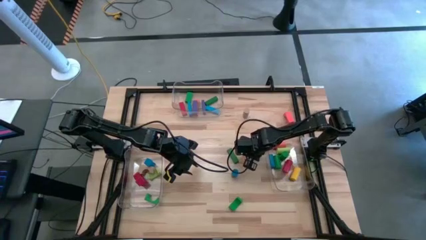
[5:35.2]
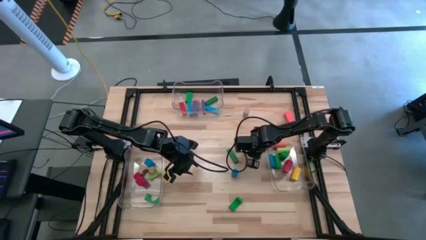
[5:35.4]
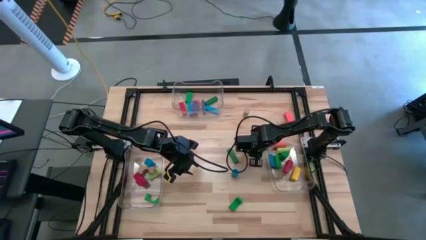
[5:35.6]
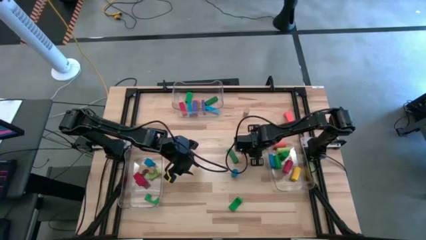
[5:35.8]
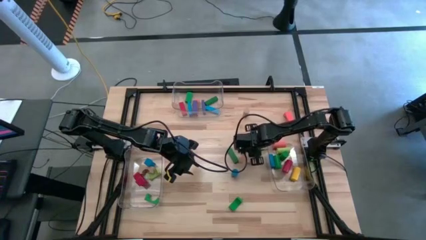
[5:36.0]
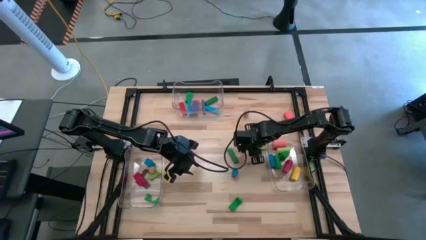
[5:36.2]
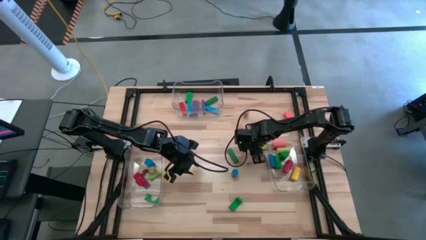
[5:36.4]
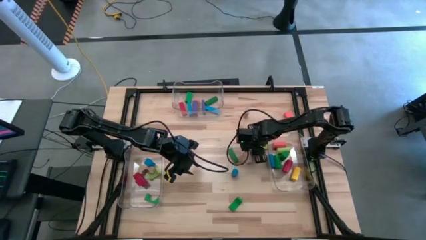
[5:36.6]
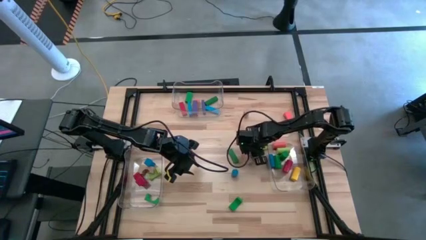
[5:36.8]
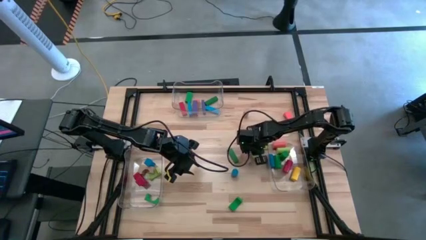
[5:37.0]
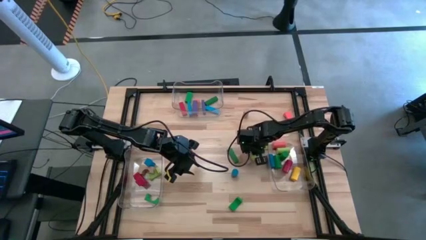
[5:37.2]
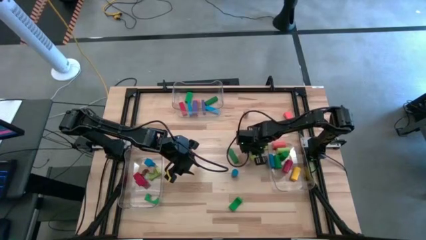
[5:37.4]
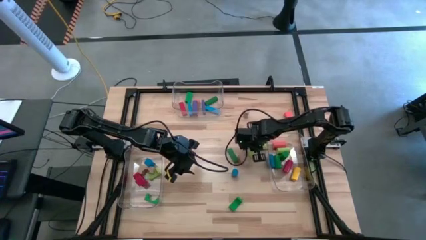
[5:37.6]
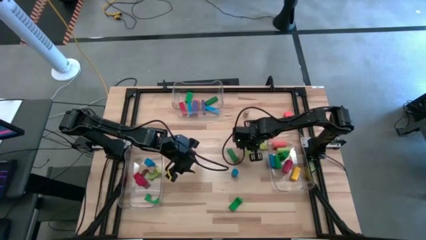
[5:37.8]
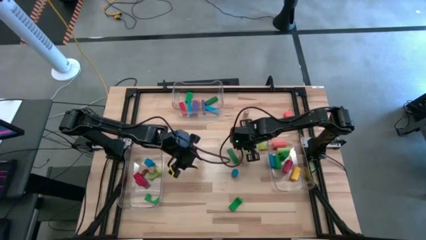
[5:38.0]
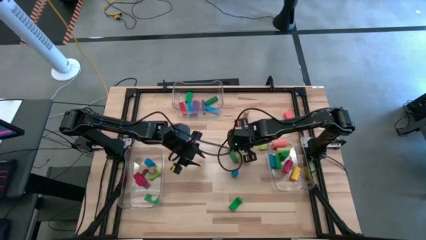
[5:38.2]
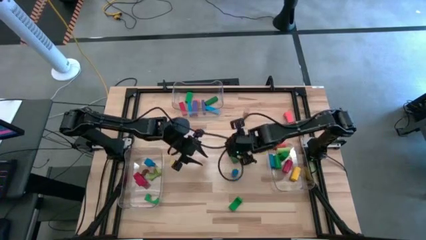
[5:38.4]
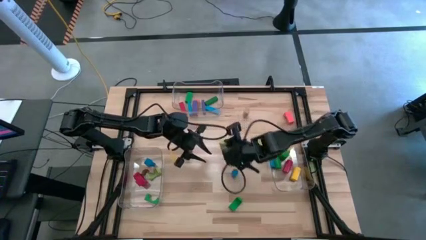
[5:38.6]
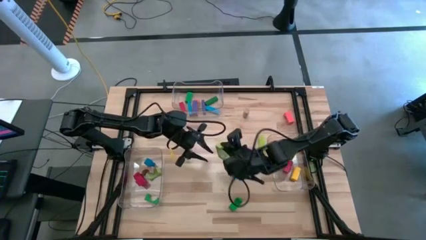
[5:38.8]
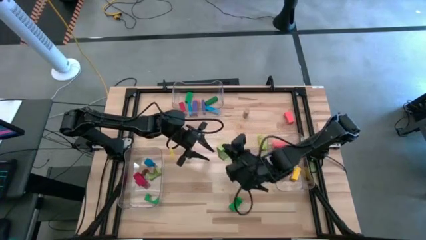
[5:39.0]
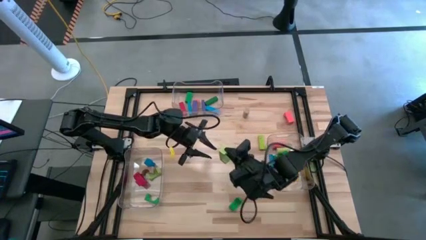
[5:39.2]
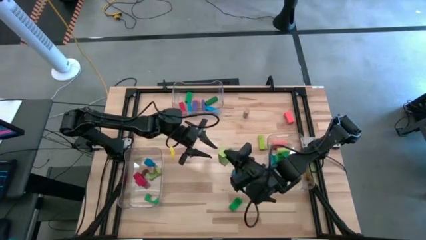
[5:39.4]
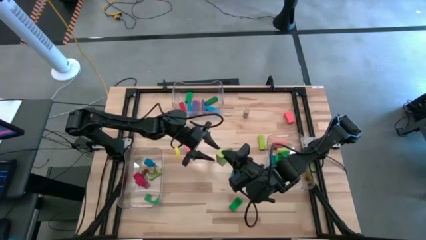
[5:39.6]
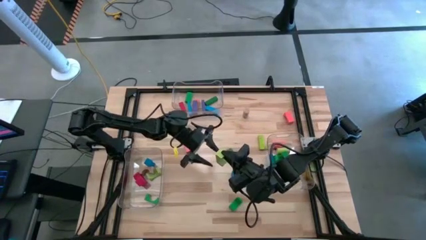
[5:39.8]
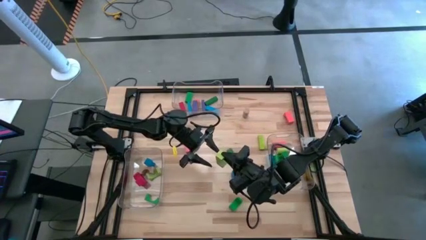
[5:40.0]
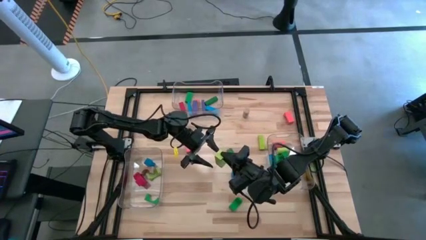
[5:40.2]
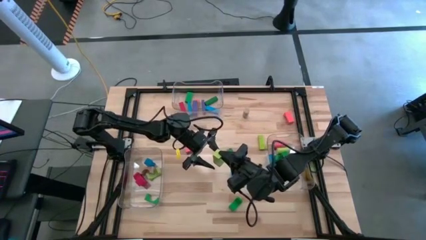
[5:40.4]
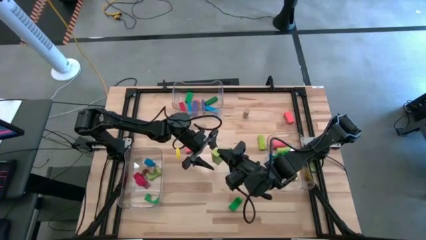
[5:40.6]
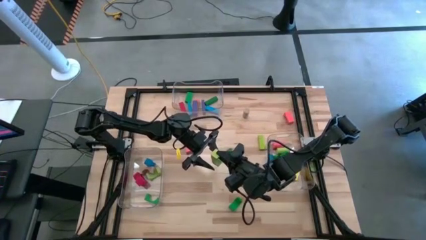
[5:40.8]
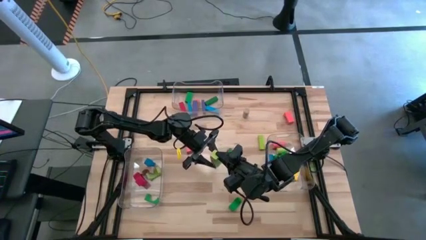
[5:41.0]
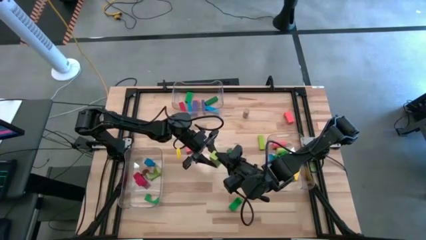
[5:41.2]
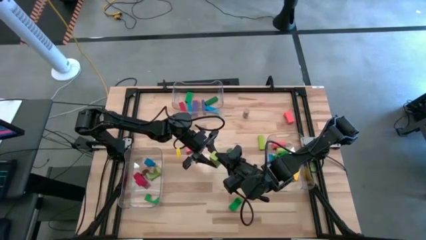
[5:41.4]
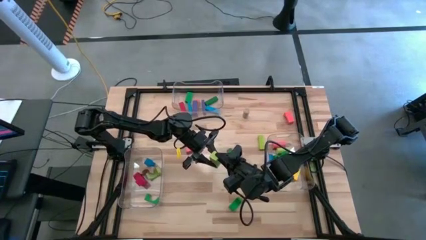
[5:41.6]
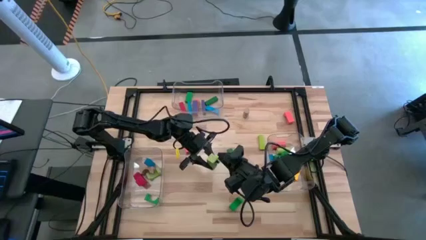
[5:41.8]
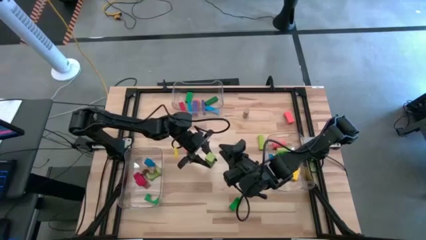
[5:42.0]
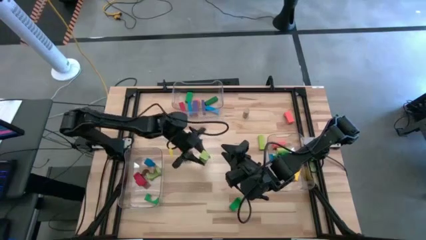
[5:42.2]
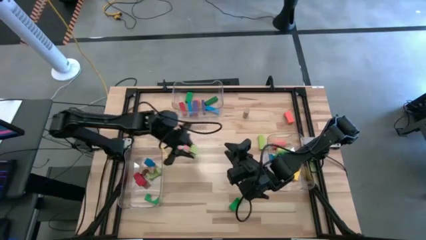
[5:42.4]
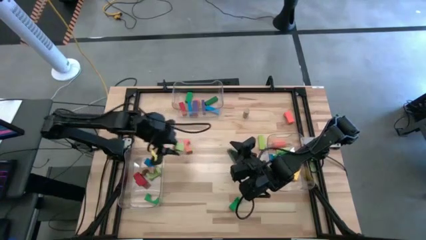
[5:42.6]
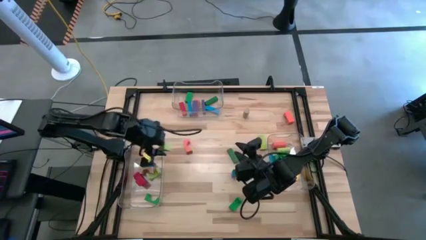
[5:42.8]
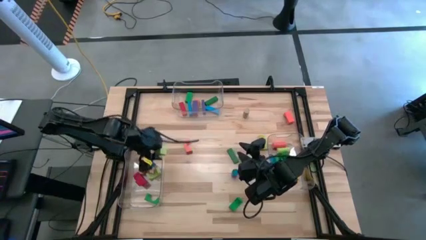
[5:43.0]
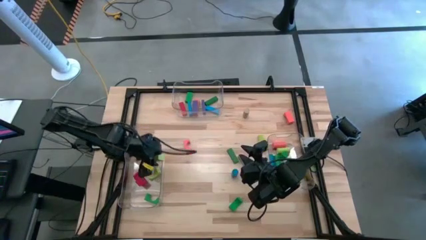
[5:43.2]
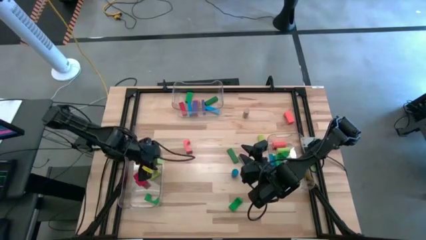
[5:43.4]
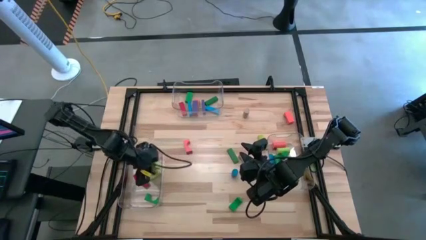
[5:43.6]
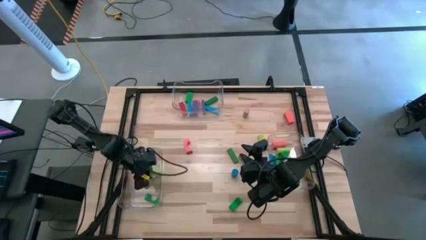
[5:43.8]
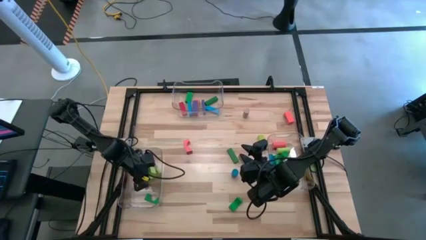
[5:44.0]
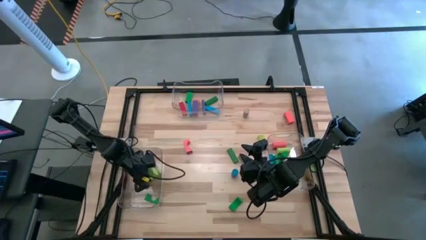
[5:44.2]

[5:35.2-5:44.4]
Task: Sort blocks by size
Put the light green arc block into the left transparent bin
